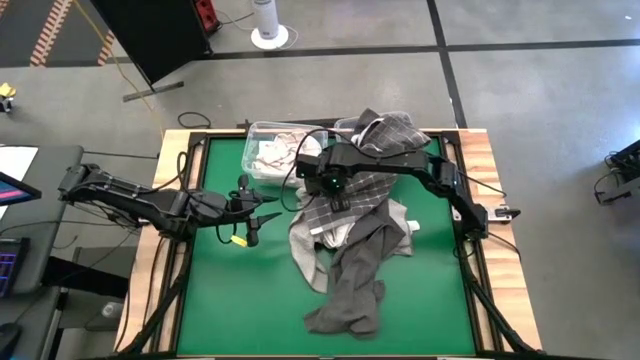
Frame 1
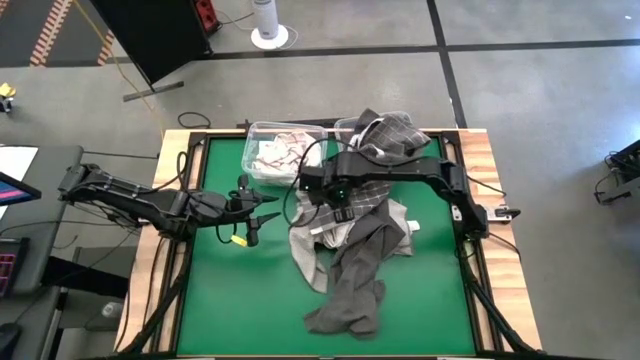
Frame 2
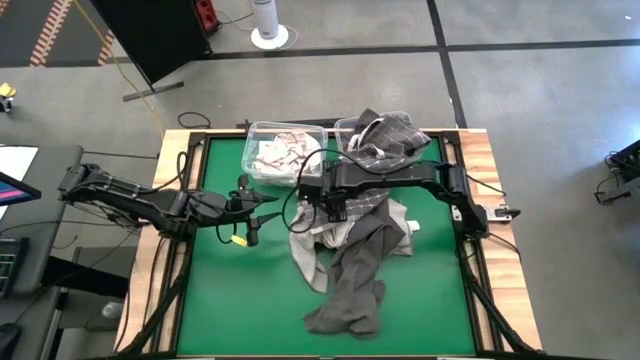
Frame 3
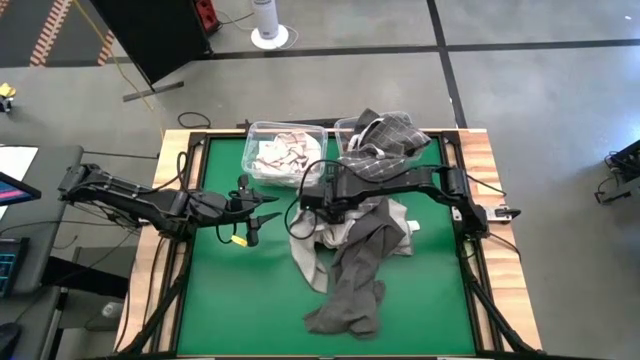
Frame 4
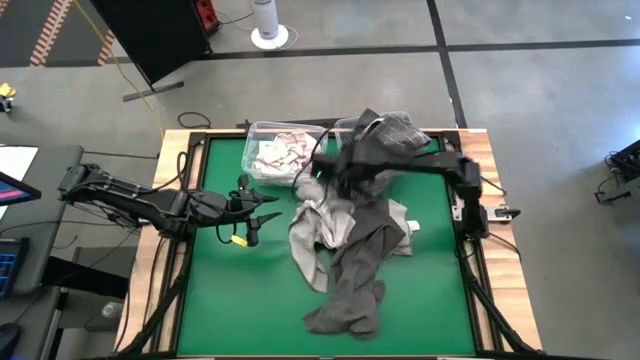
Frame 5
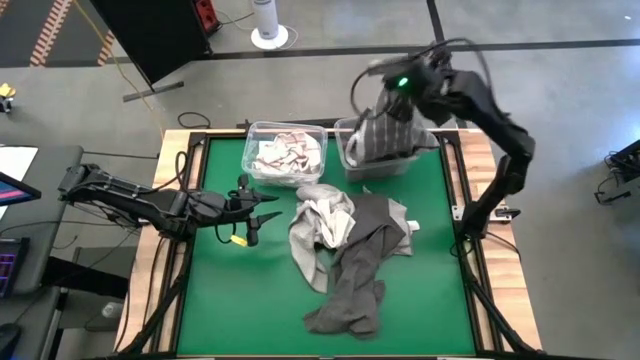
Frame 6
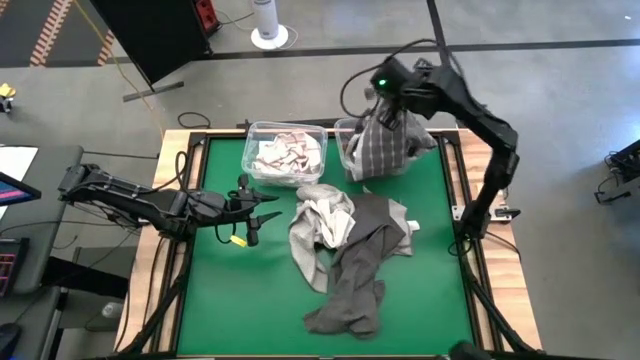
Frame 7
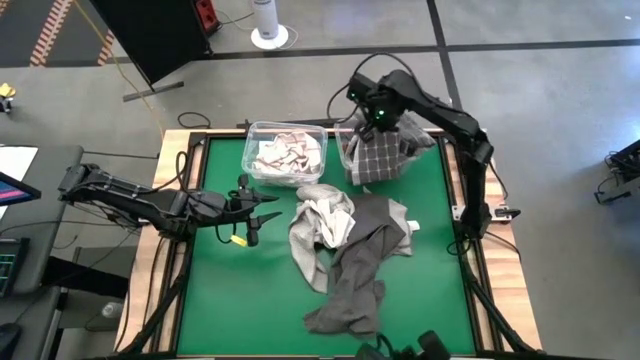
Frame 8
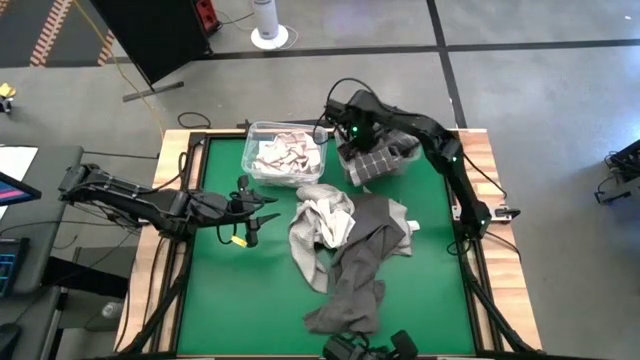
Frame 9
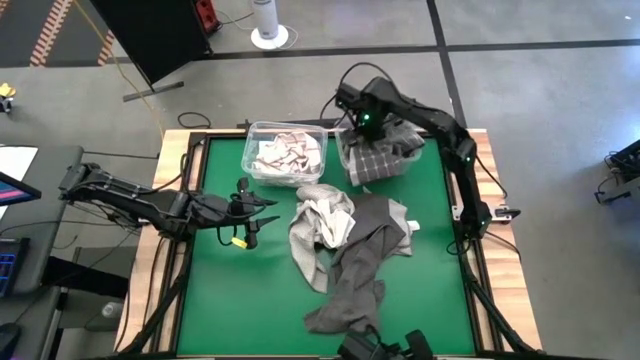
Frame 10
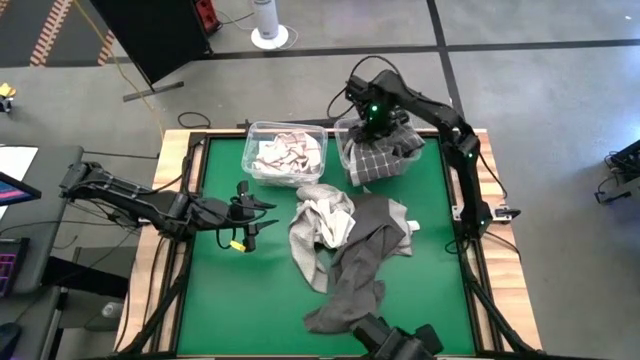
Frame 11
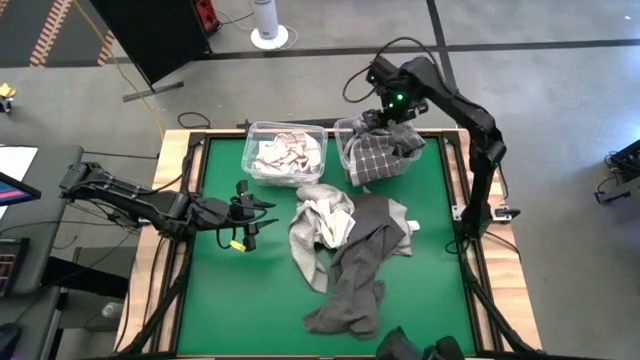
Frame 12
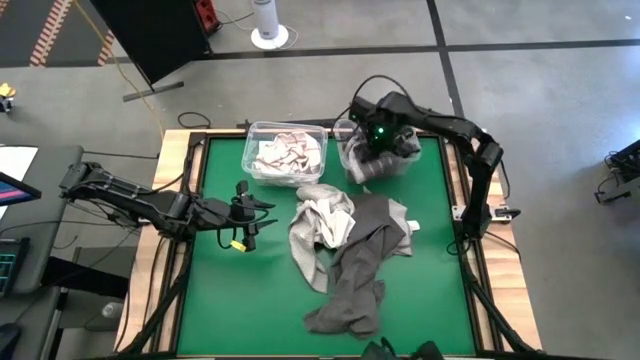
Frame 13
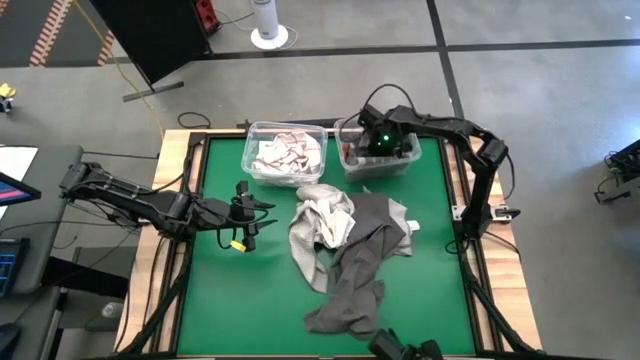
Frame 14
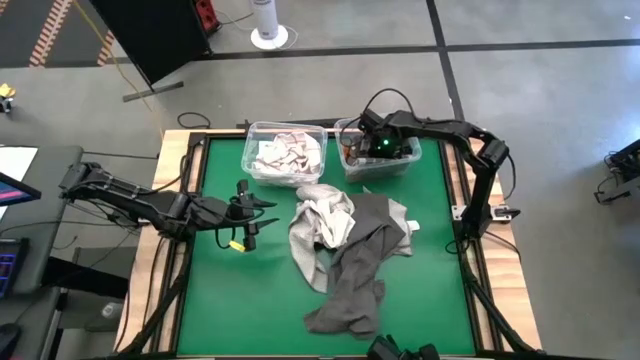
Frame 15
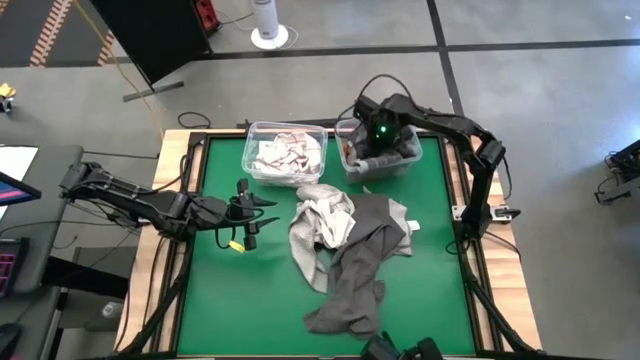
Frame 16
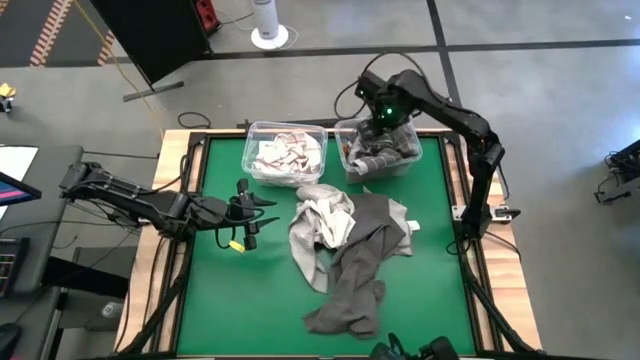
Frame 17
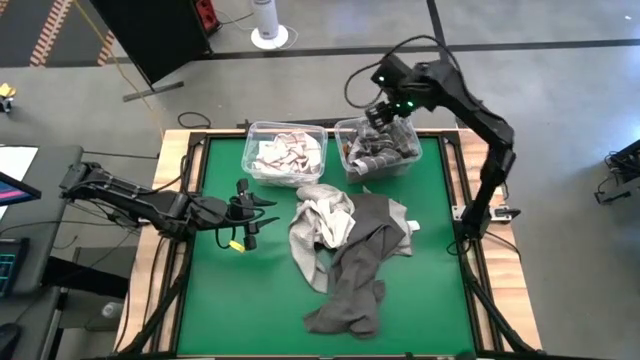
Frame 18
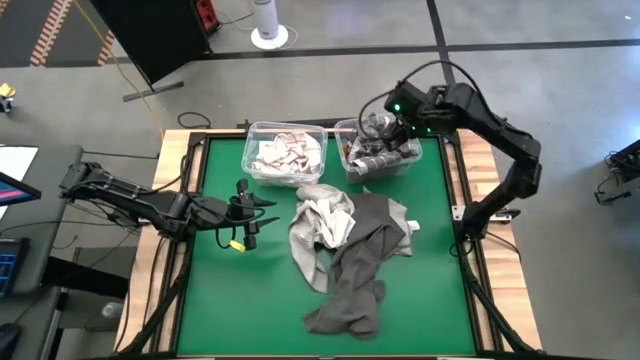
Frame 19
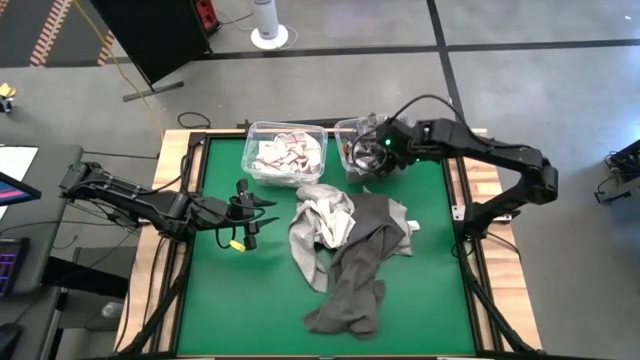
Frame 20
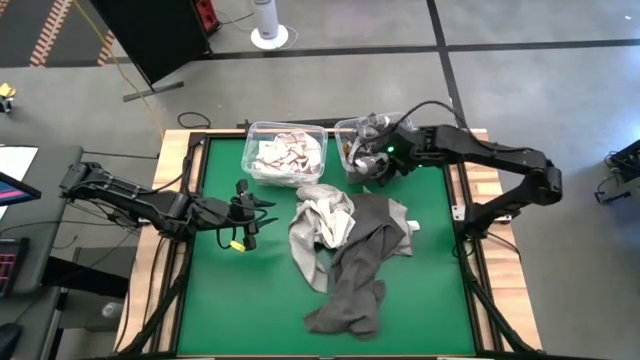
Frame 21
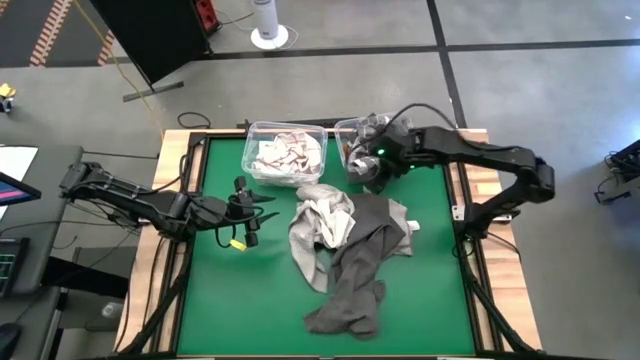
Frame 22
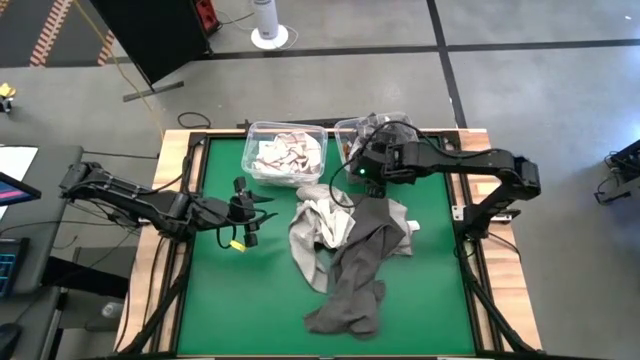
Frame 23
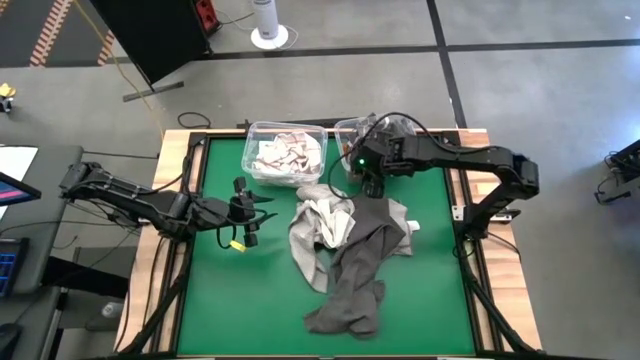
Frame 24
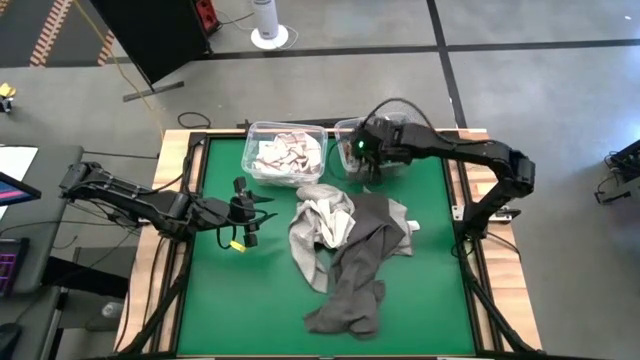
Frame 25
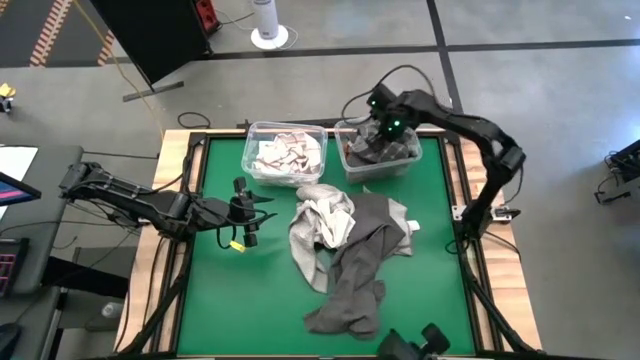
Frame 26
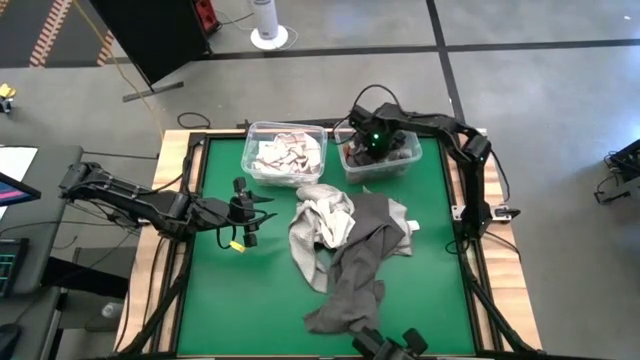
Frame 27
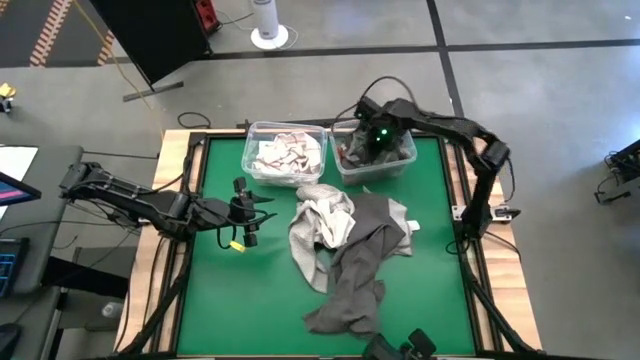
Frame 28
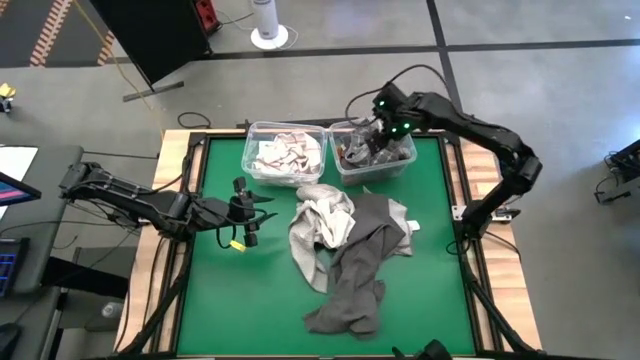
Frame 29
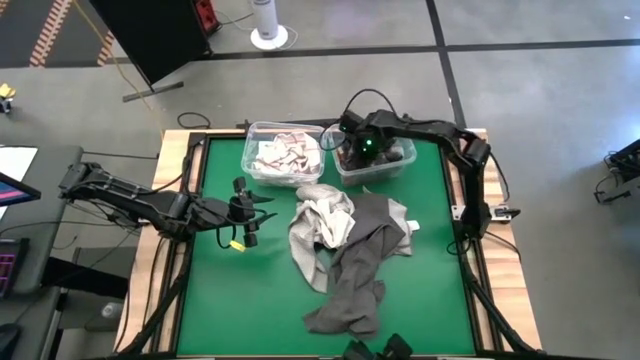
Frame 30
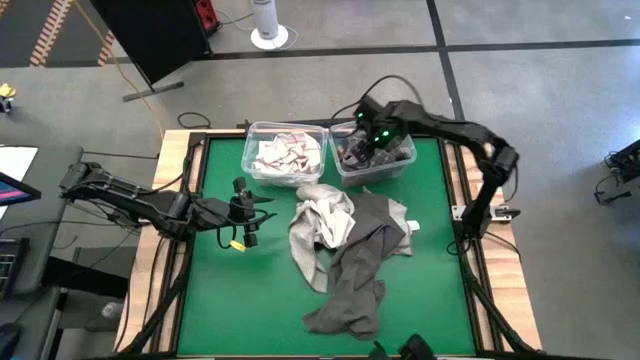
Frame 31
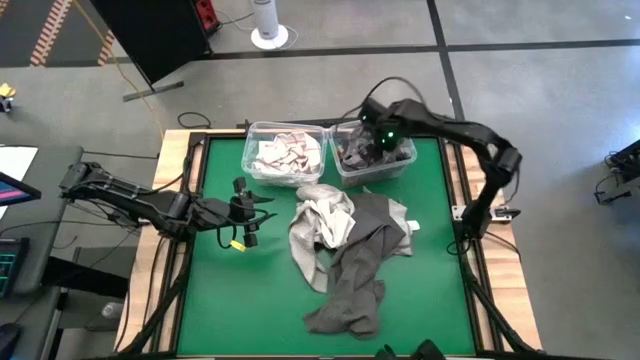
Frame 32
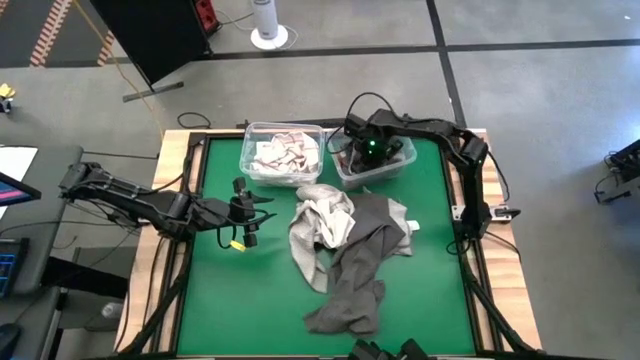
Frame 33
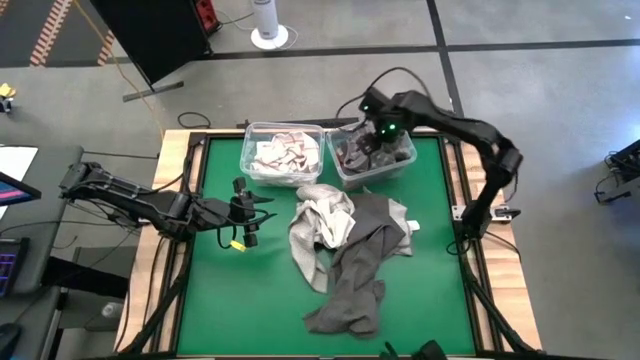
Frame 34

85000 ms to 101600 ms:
Task: Sort towels by color in basket
Put the black striped microfiber towel into the right transparent bin

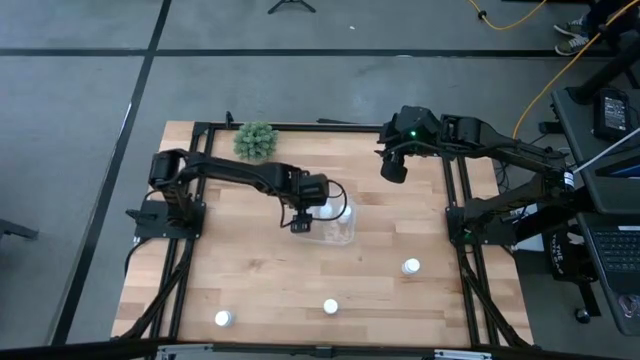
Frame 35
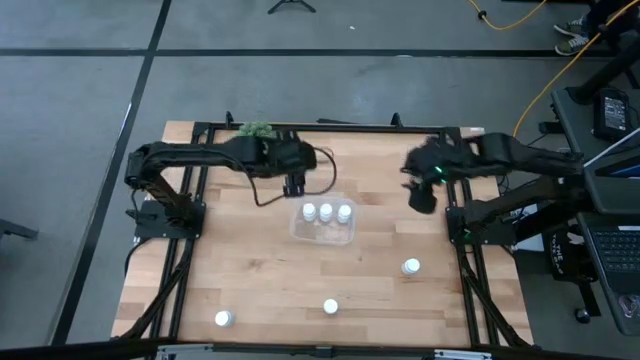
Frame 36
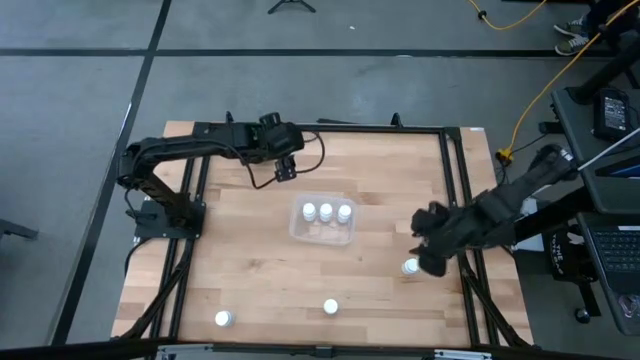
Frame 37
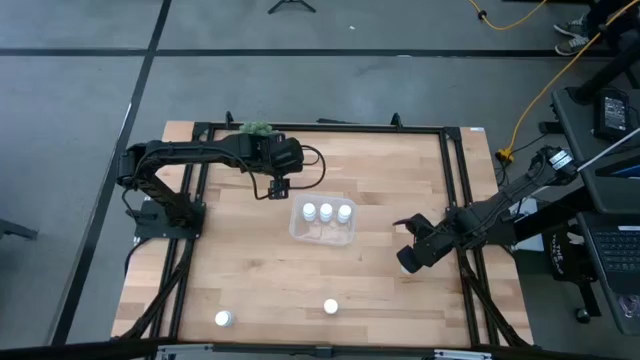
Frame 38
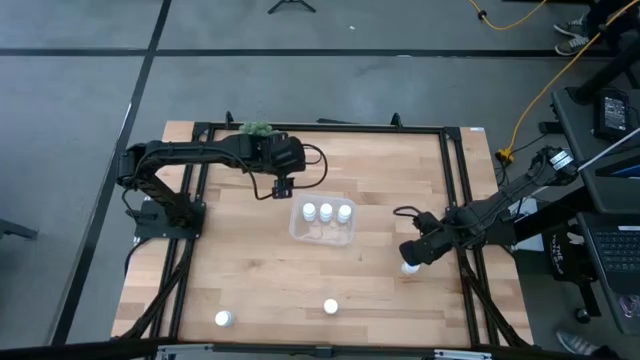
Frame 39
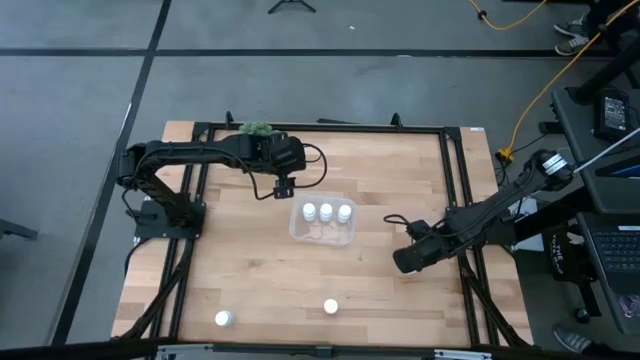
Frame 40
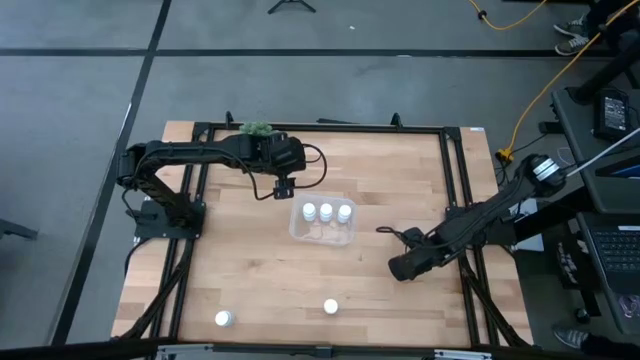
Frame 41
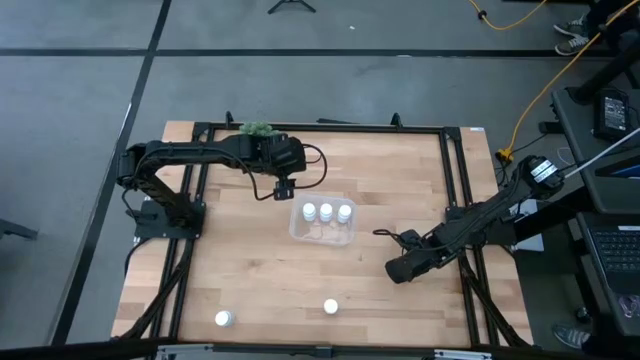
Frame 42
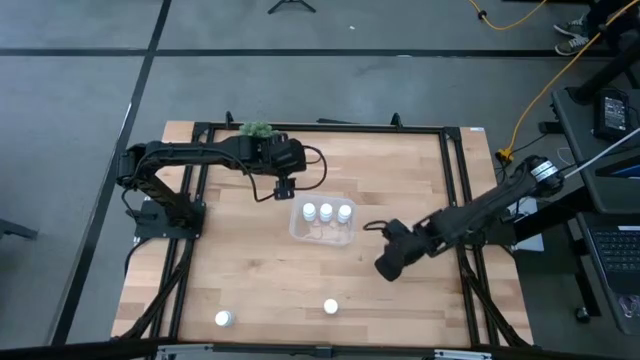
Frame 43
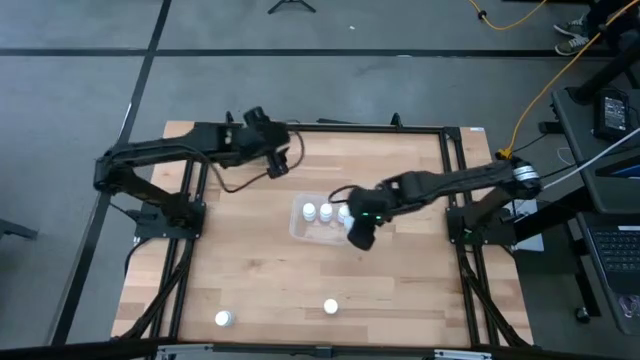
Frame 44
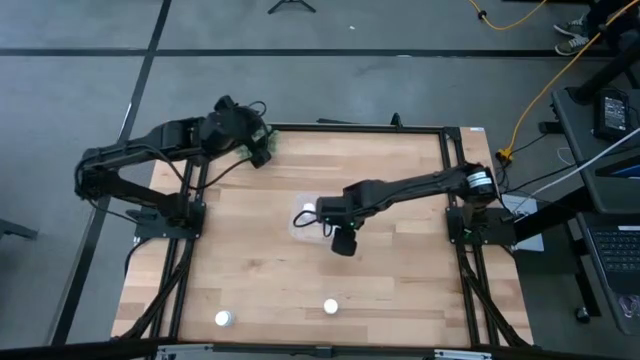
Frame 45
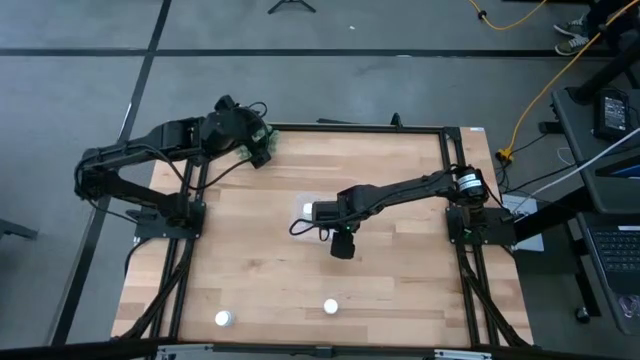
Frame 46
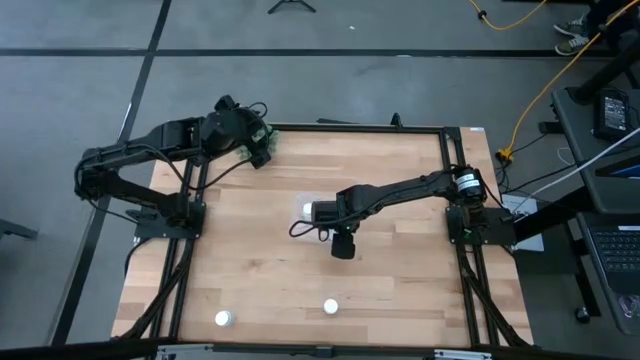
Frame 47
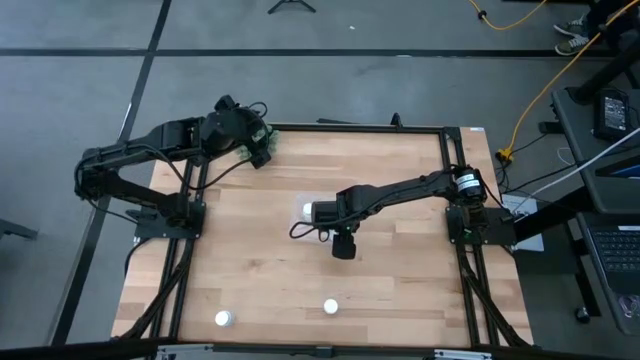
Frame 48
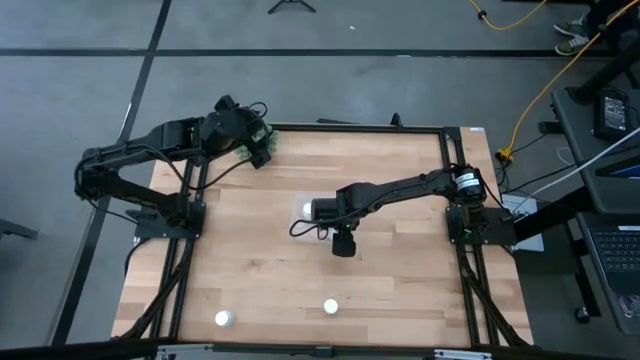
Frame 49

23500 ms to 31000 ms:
Task: Pick and place pill bottles into a basket
Put the top white medicine bottle into the transparent bin
